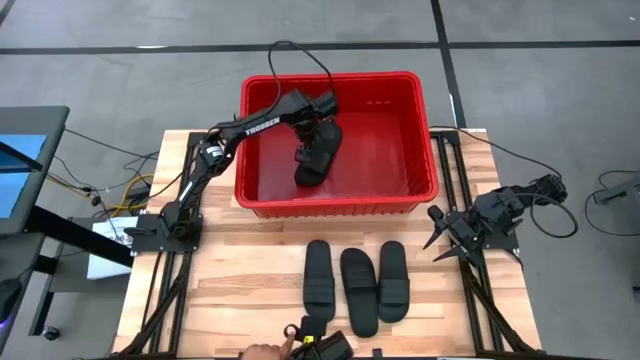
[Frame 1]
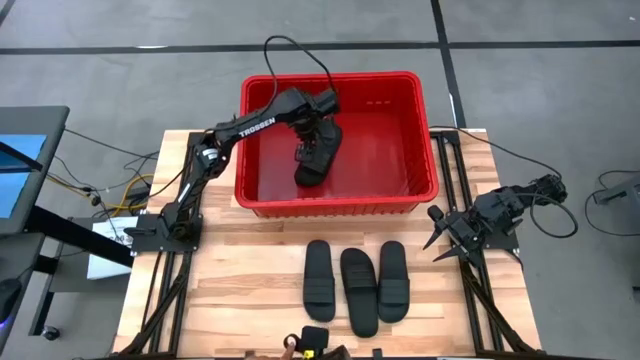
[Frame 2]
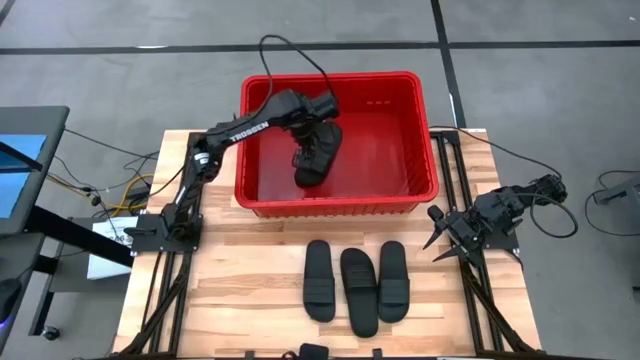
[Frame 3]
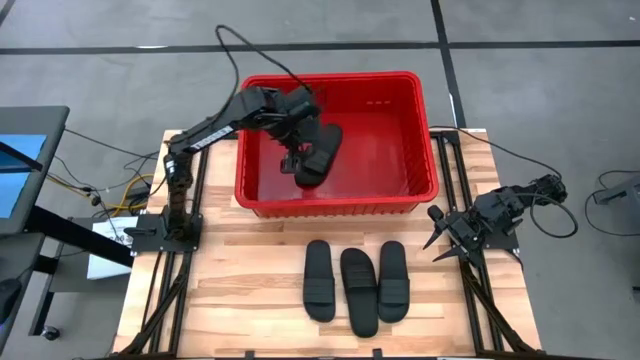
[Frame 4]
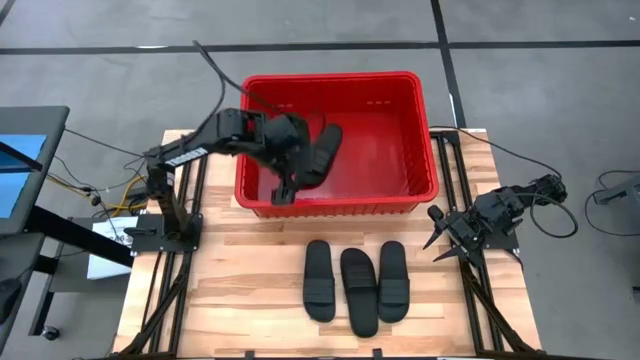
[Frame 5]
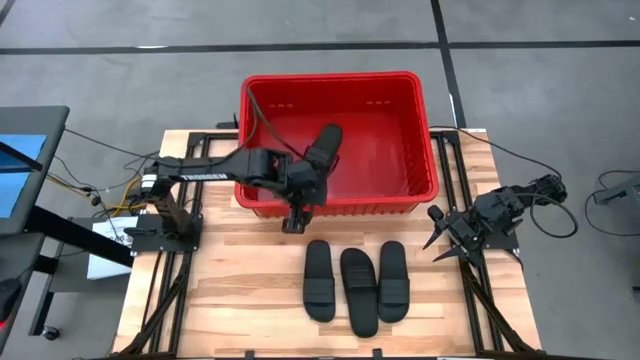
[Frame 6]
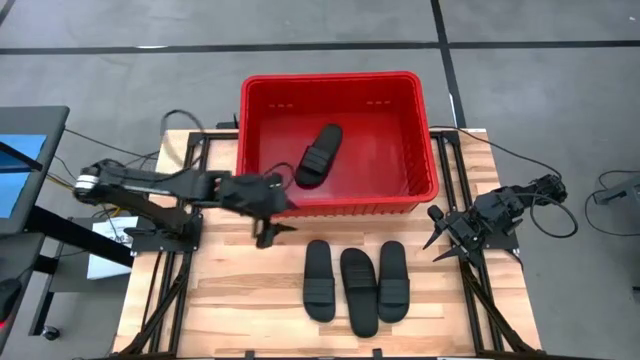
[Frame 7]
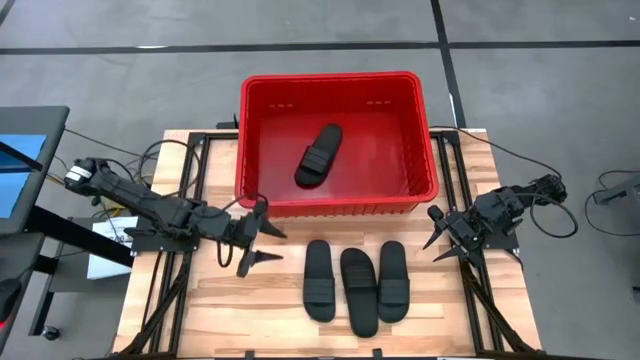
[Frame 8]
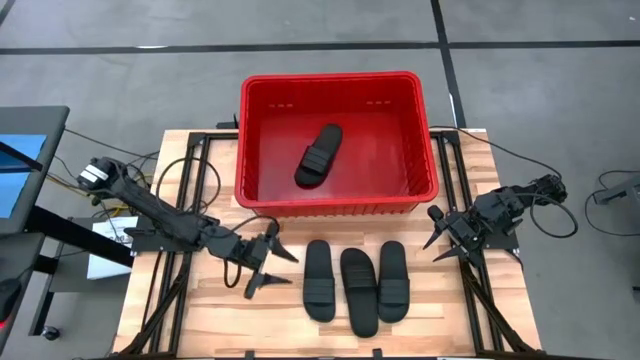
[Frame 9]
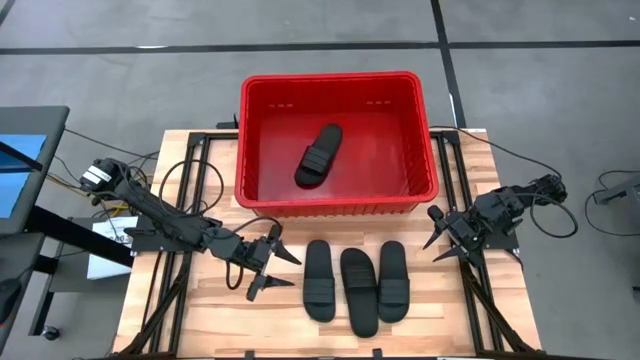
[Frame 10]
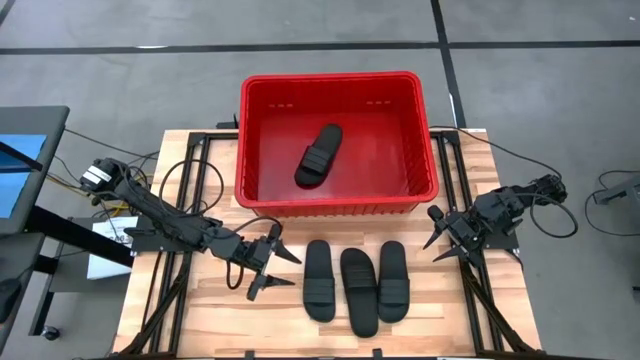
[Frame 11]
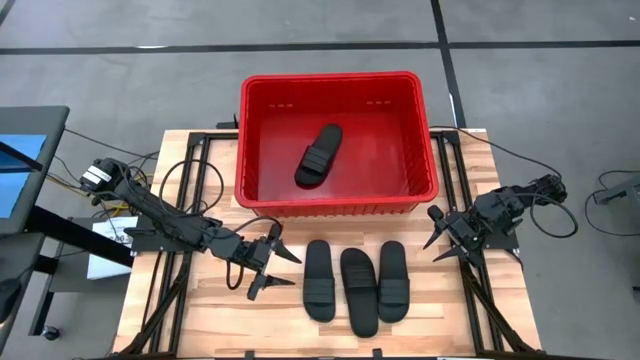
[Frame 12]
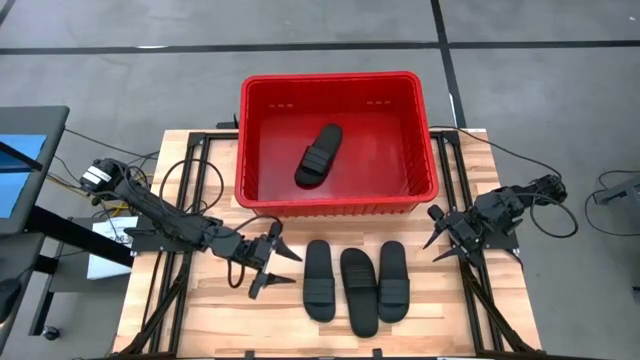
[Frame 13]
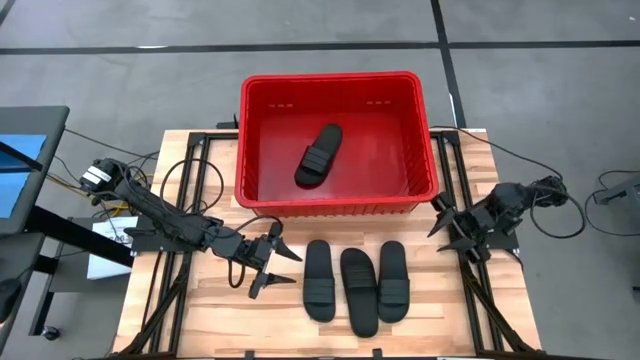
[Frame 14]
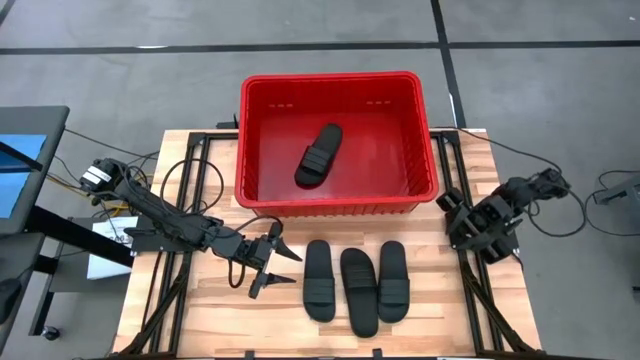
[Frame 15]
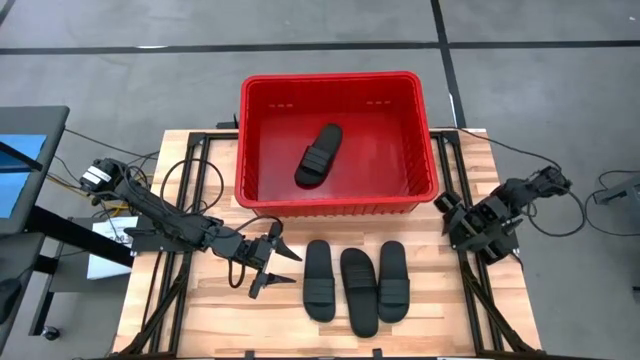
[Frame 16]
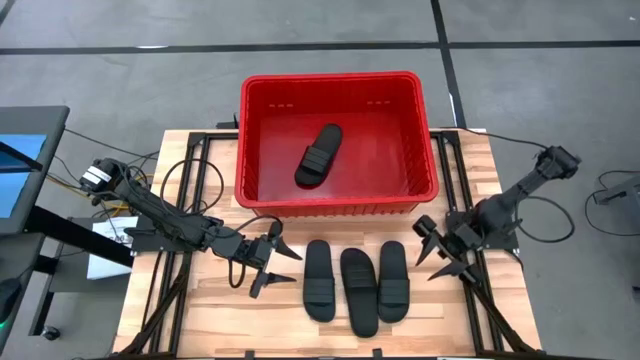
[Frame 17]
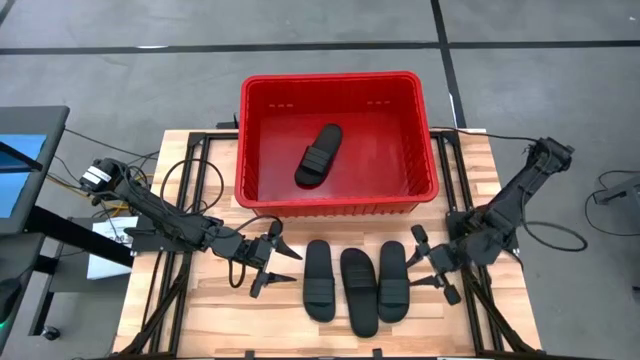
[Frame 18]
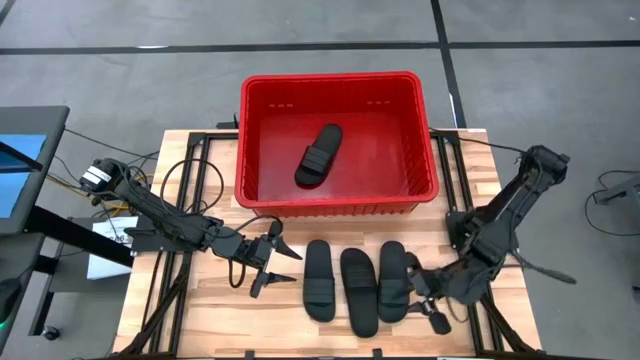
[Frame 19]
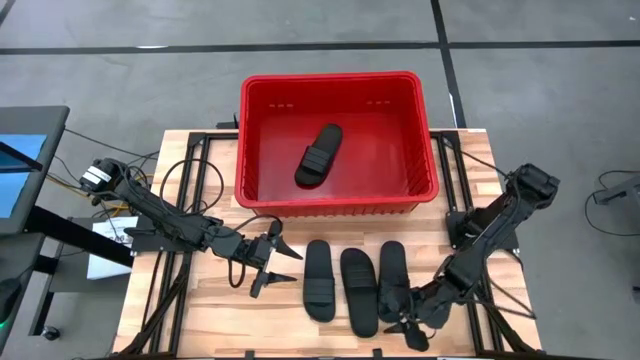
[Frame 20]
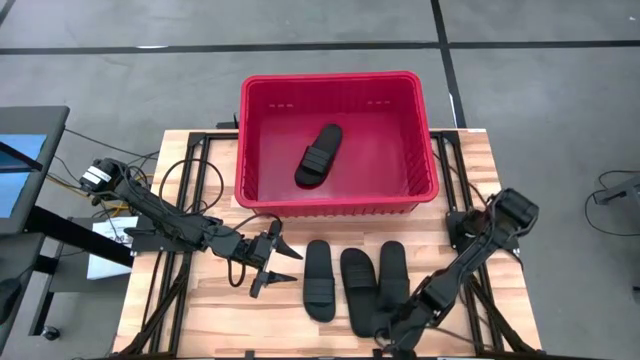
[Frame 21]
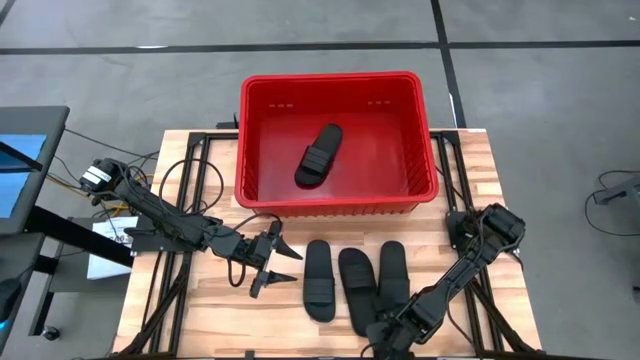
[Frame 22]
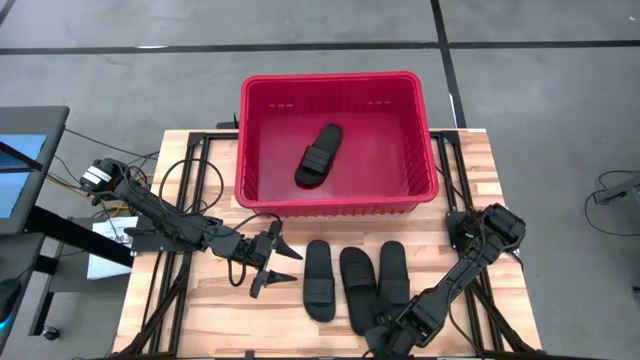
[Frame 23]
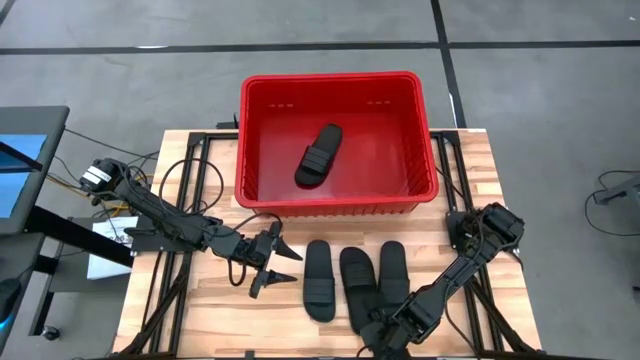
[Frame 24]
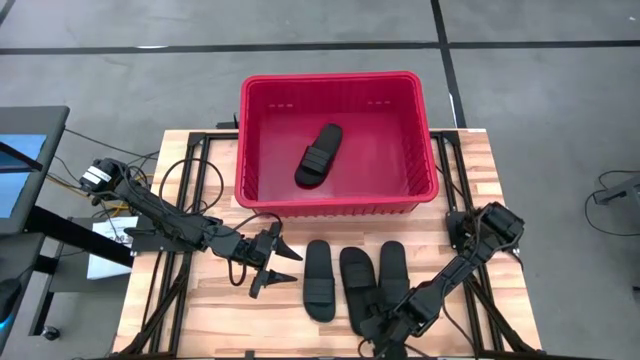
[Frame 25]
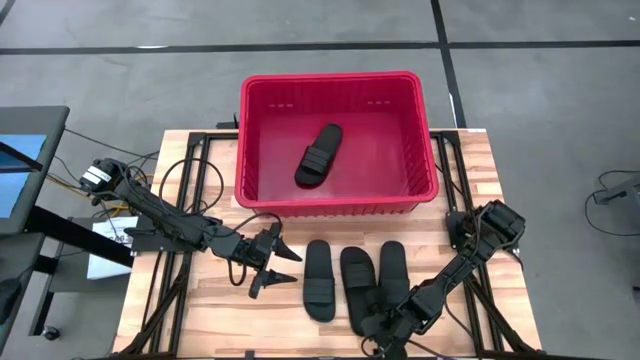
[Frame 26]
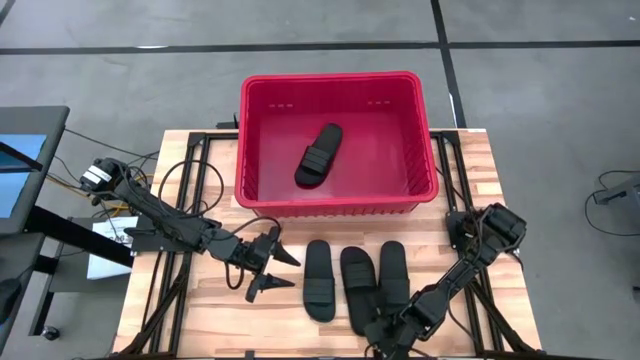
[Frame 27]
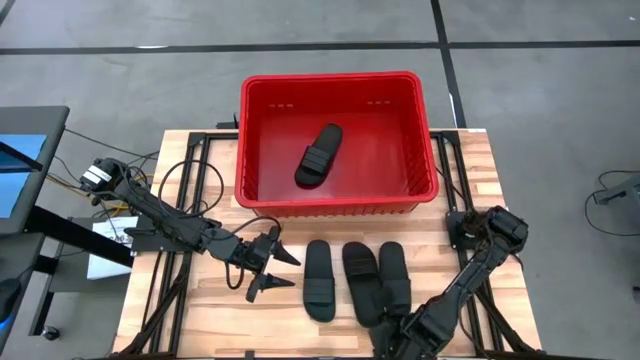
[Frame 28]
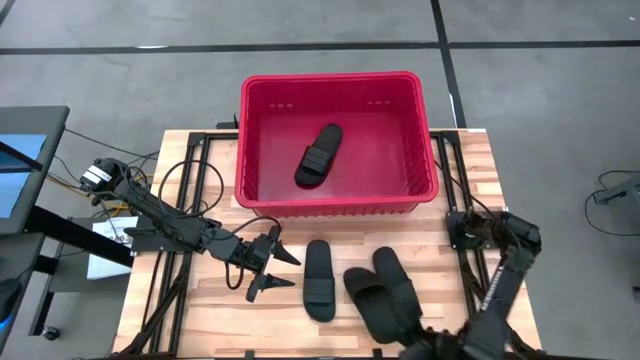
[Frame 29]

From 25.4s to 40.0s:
Task: Pick and place slides into bin
Put the black slipper into the red bin

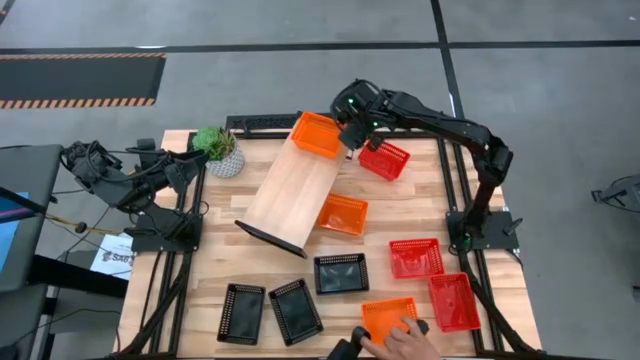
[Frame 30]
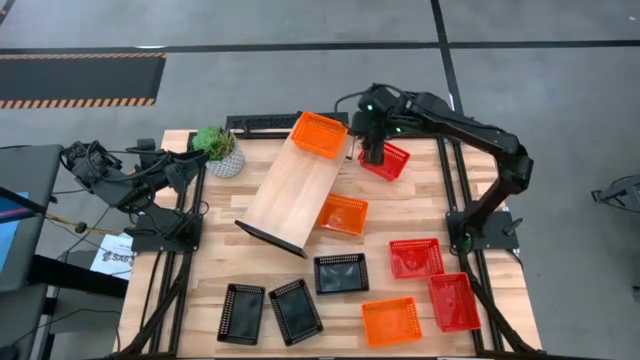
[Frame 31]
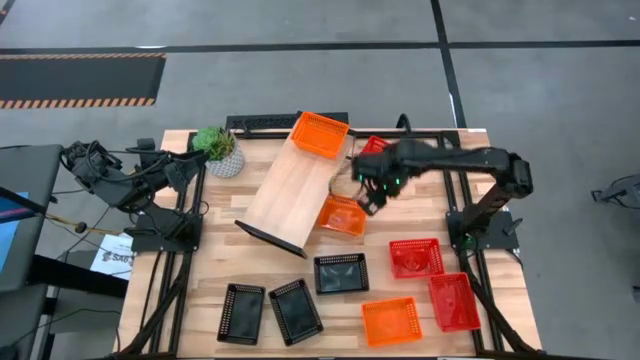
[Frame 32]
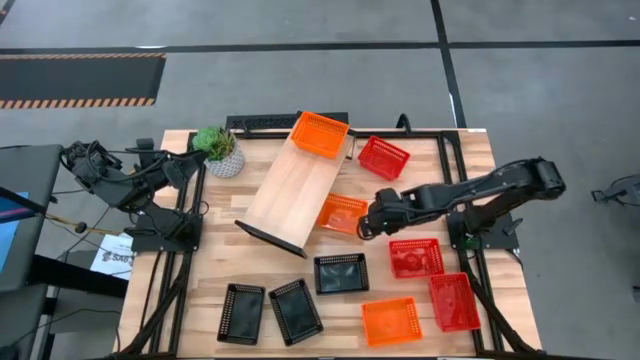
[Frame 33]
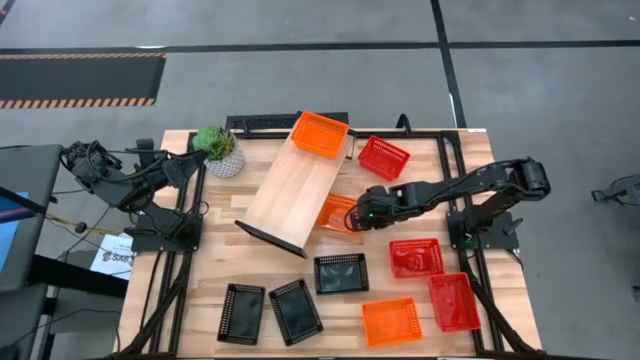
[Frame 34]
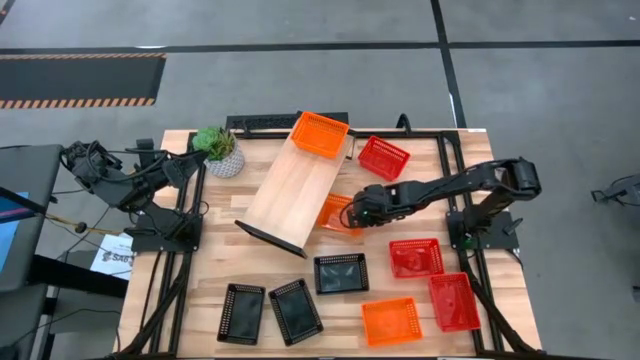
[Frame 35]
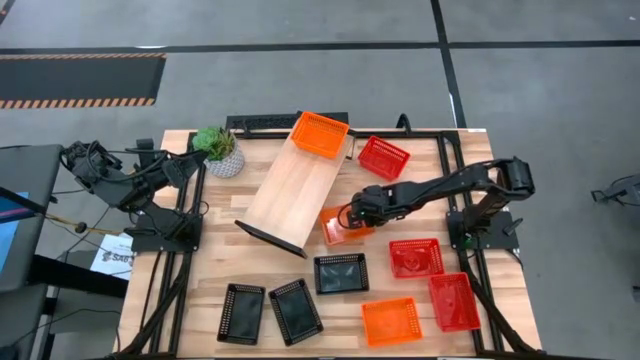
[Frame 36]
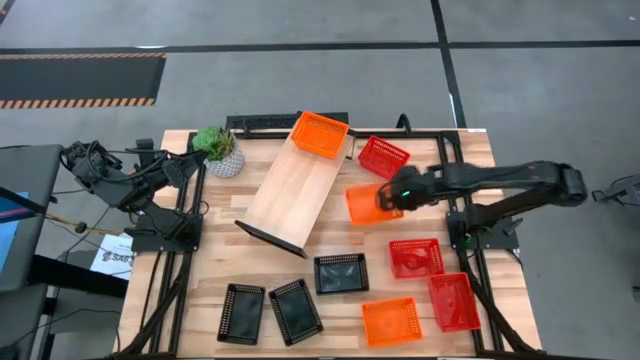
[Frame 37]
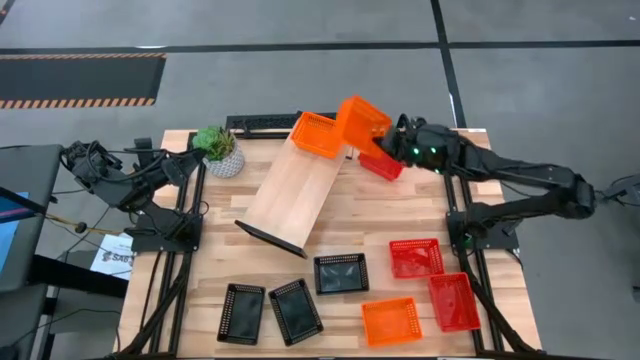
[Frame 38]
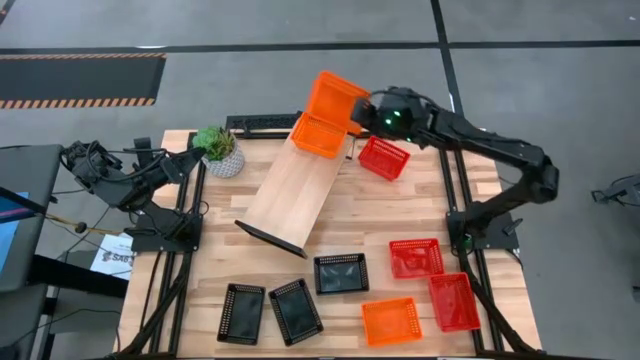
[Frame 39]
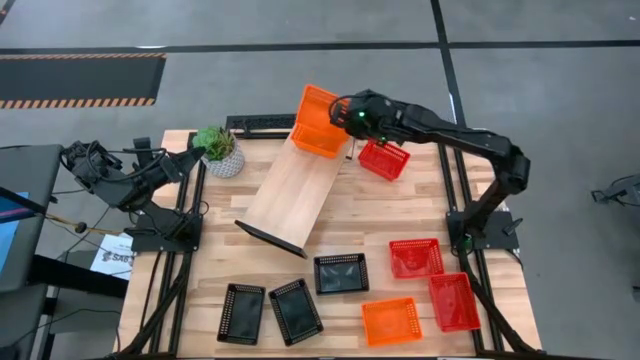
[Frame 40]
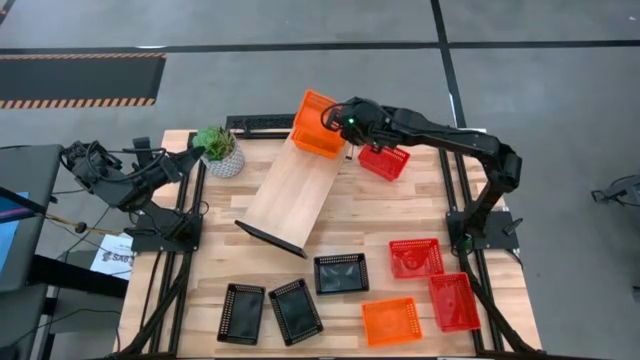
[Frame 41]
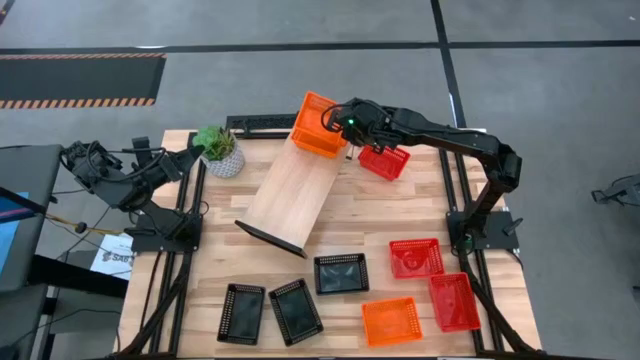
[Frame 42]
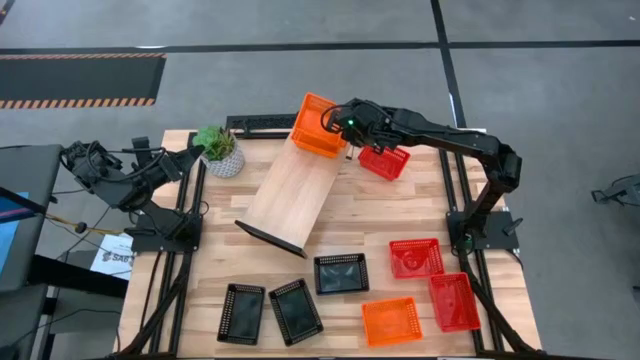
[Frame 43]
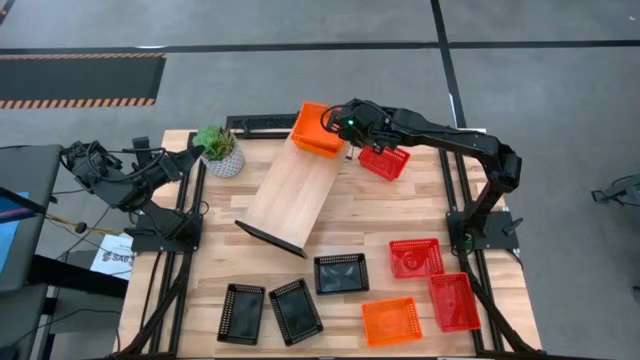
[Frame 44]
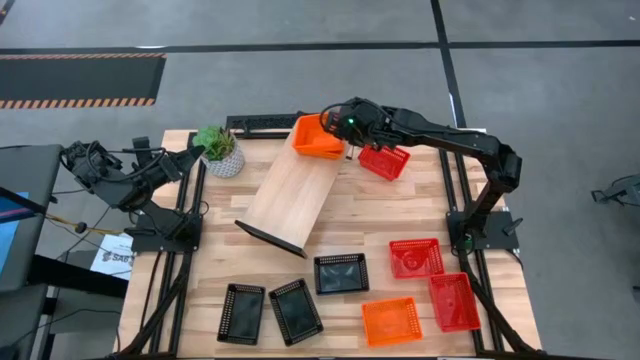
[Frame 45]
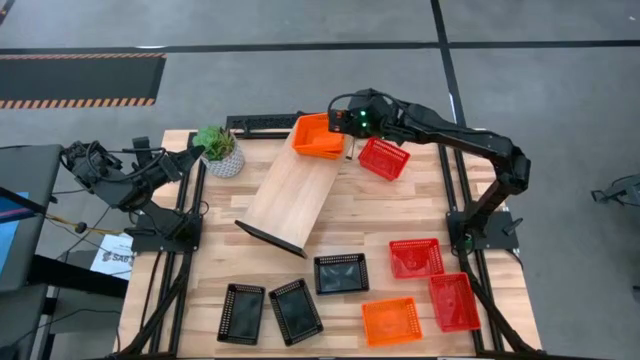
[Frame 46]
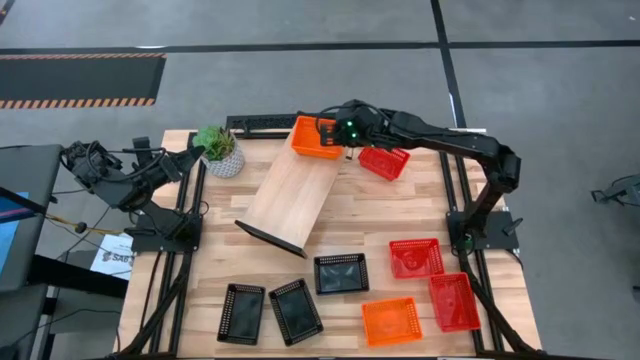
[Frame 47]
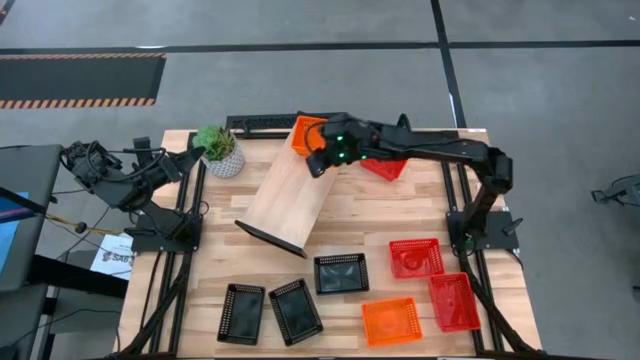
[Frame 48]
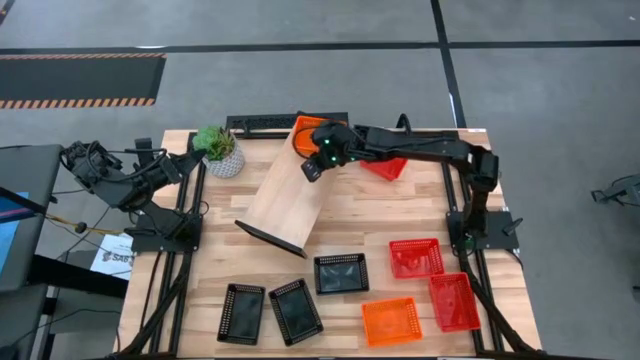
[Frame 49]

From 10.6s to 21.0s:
Task: Stack baskets on shelf by color
Stack the top orange bin on top of the orange bin on the shelf
